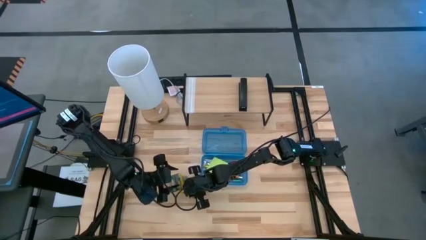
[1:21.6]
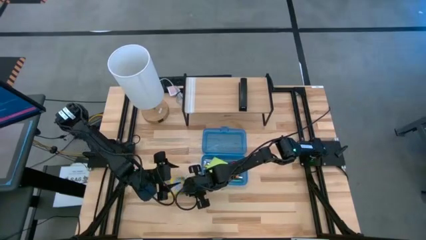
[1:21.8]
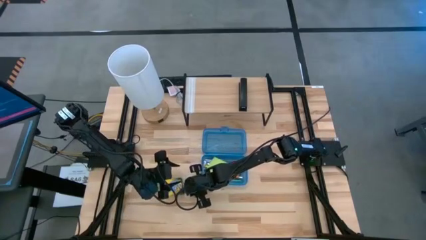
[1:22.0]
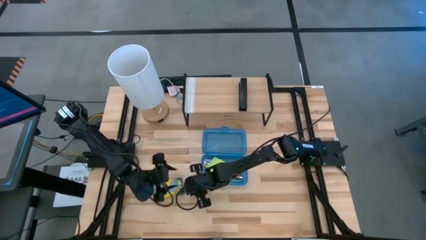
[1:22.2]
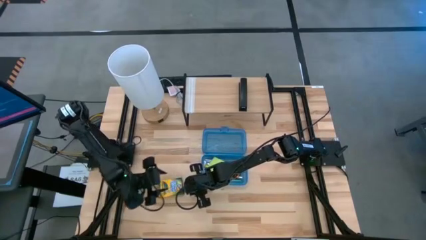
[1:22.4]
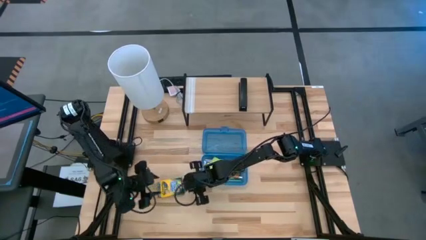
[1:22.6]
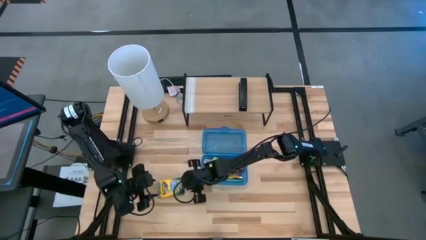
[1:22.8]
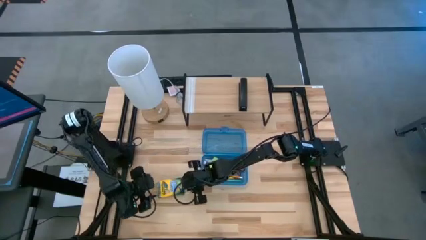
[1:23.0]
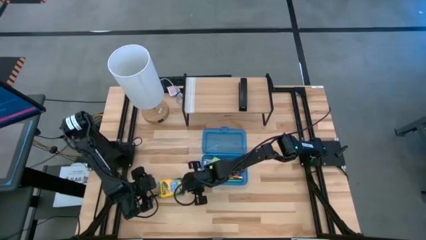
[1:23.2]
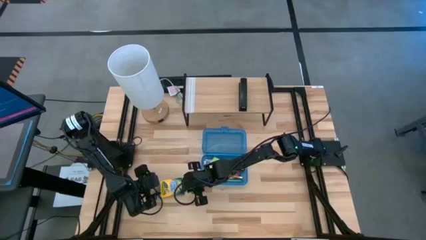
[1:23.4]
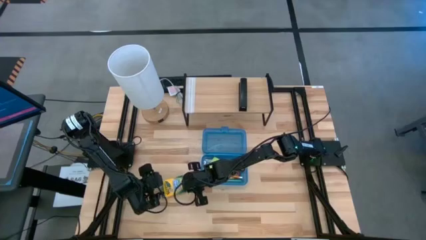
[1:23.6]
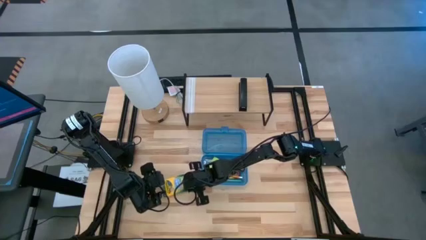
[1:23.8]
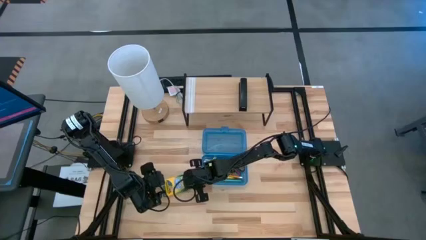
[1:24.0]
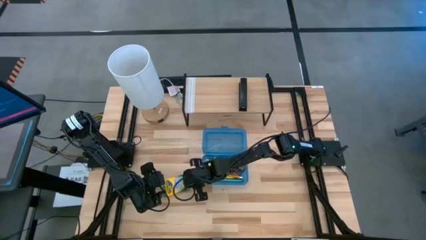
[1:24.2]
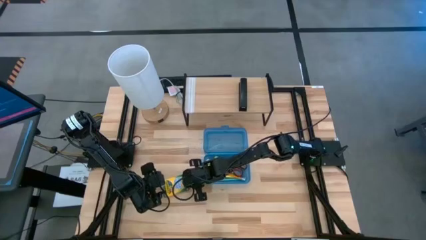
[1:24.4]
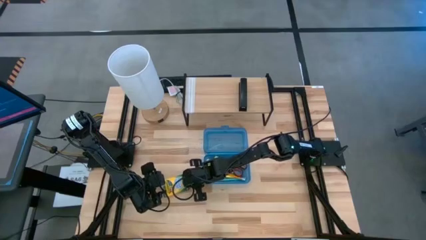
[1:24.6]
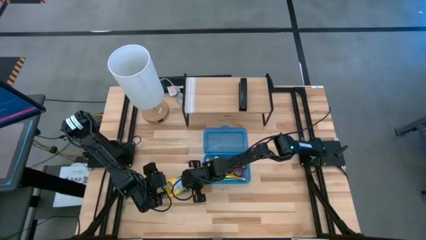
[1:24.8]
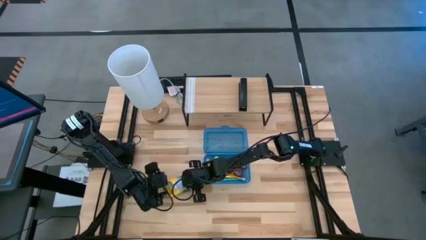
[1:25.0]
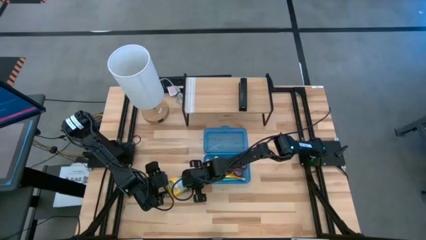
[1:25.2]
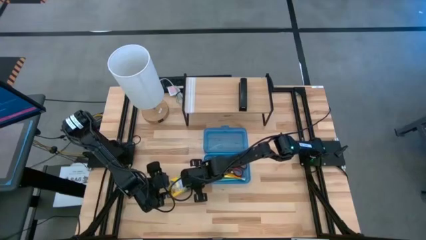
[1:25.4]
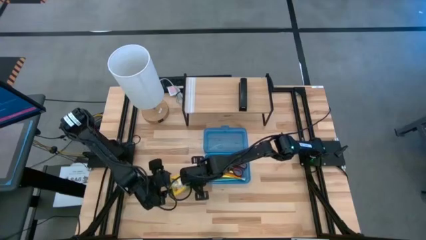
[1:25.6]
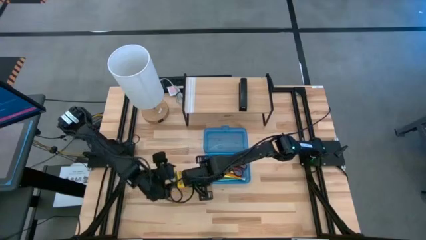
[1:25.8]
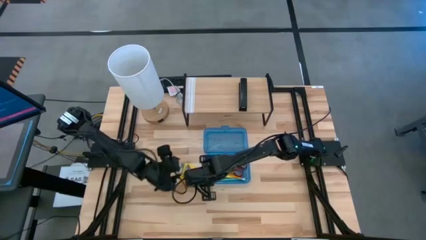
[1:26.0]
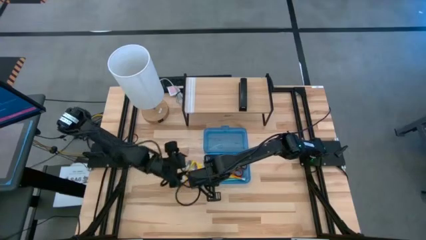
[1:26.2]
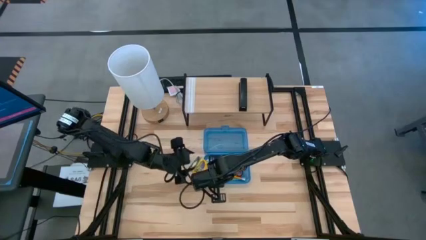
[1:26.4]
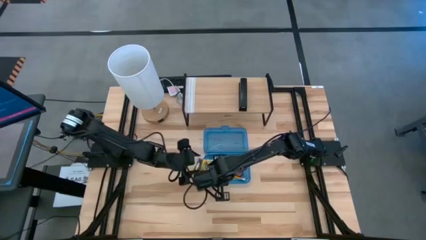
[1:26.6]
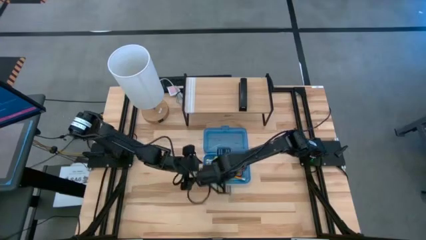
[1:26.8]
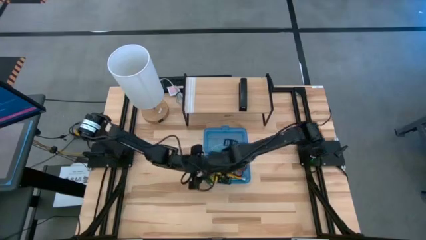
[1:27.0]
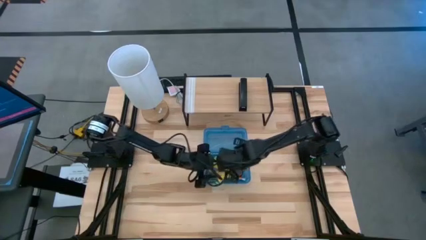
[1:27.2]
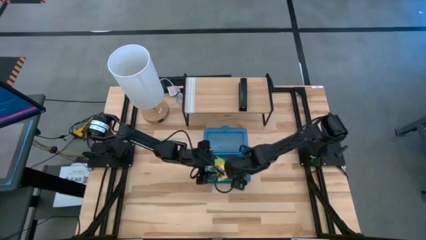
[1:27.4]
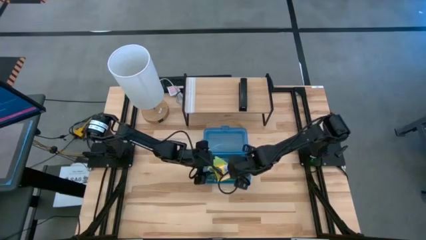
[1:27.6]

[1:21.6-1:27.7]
Task: Pack school essentials
Put the yellow crayon box into the blue supply box

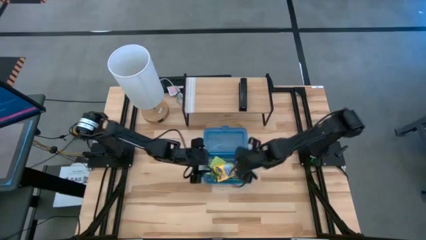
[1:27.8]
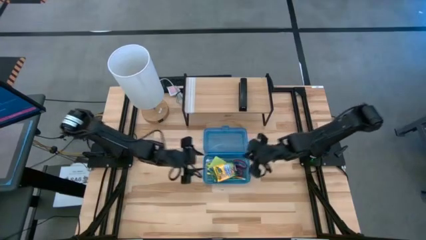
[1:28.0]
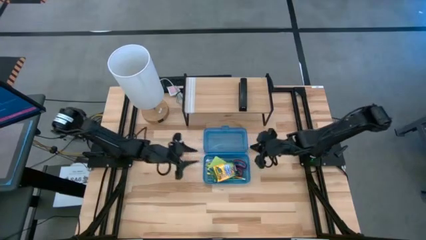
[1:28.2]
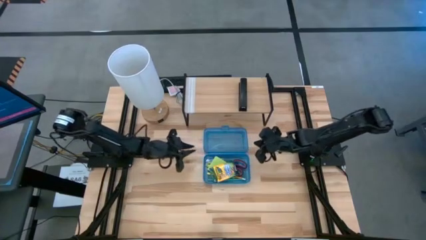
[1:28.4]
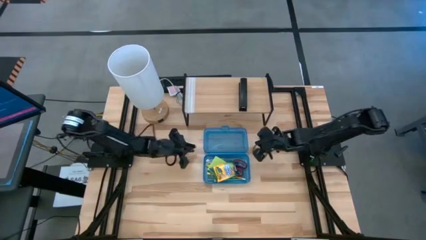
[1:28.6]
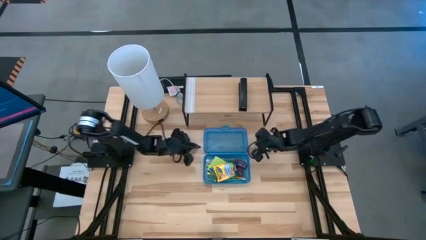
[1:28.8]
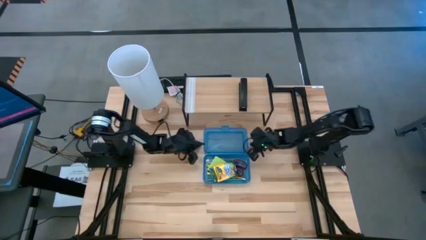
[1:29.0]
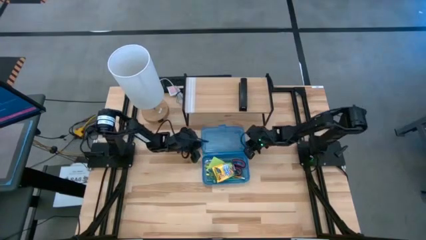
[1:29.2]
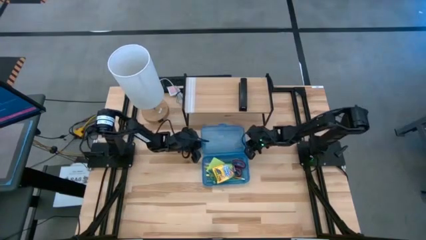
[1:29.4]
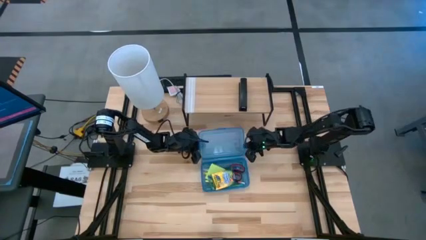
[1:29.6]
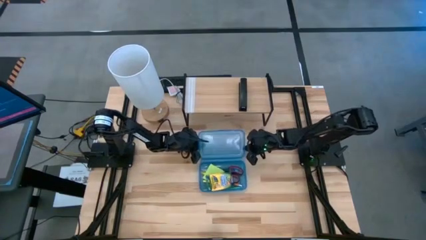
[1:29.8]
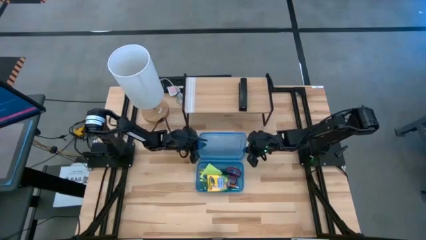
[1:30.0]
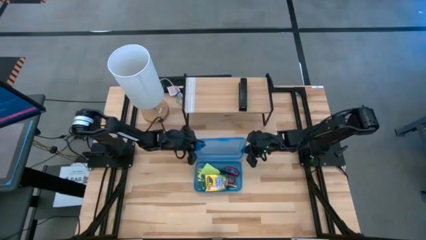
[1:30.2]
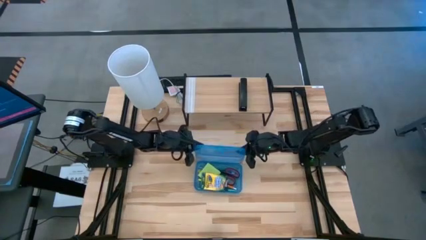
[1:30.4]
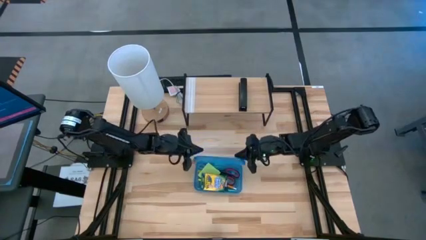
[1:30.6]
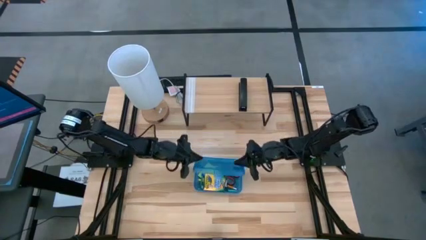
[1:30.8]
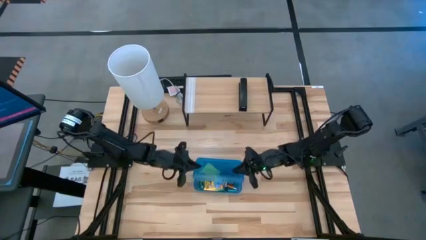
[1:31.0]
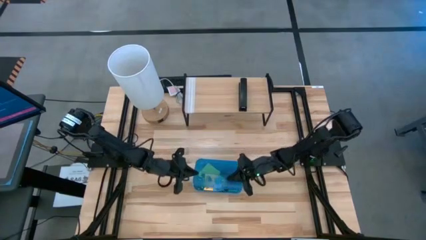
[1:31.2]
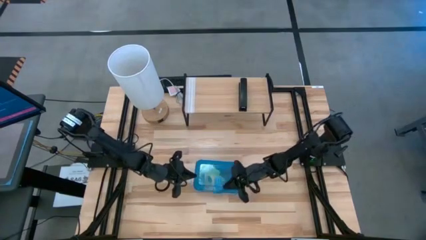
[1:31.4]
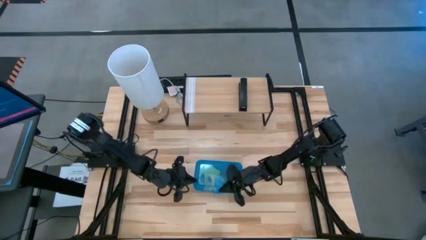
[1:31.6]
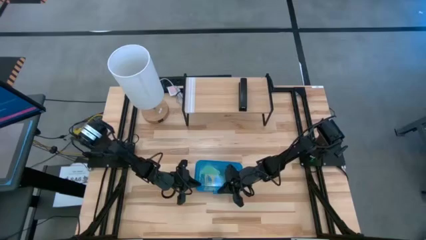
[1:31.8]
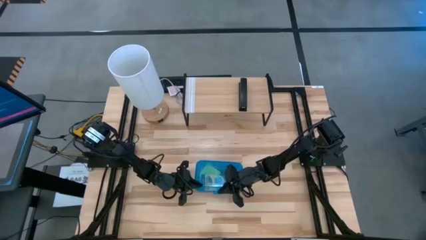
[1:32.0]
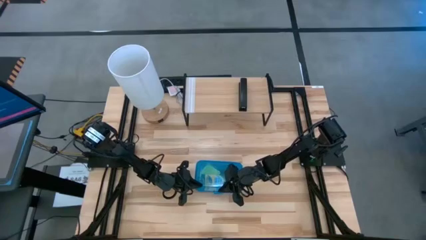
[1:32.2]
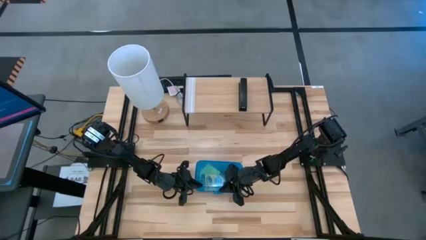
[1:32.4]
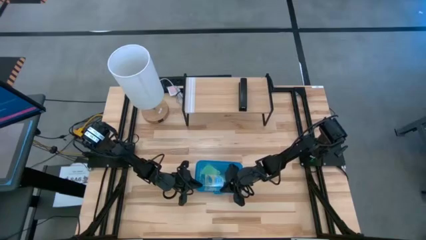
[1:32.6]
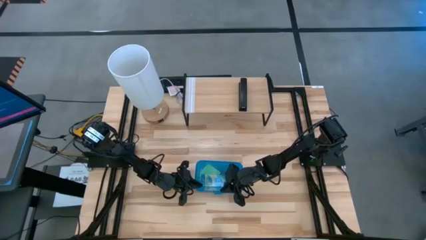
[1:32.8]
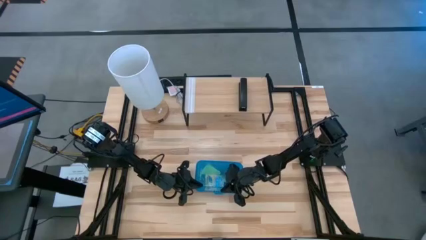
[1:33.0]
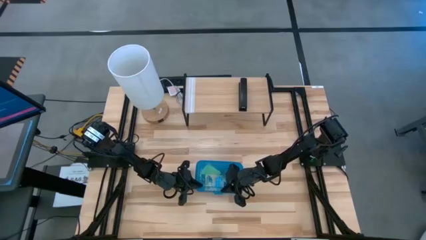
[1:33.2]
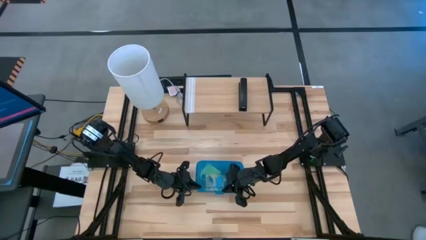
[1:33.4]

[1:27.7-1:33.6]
Close the blue supply box

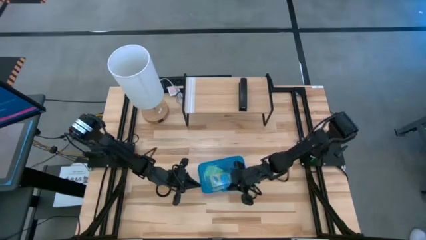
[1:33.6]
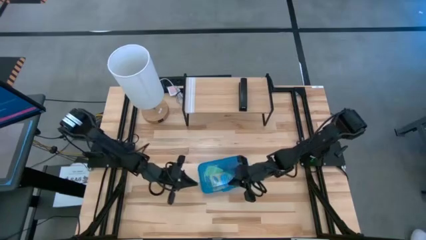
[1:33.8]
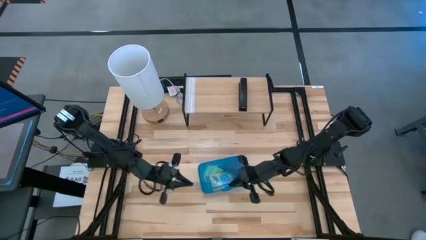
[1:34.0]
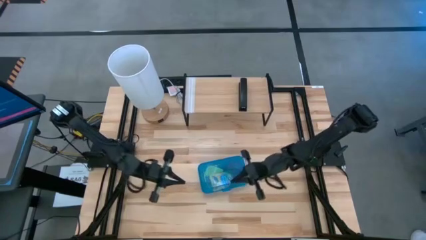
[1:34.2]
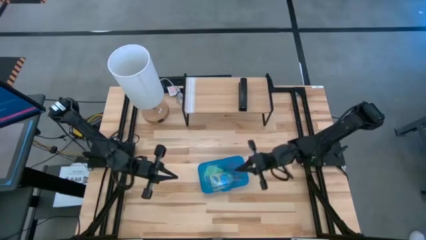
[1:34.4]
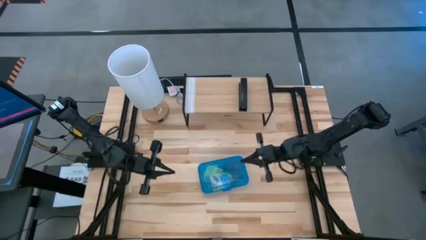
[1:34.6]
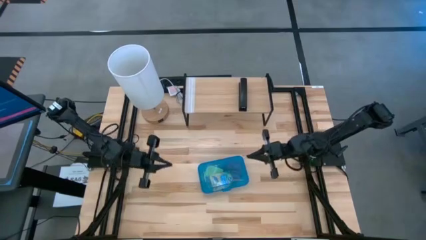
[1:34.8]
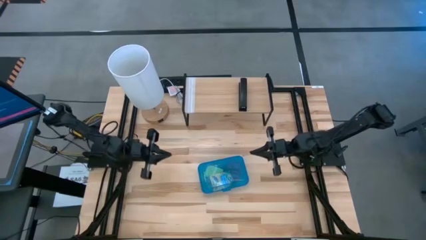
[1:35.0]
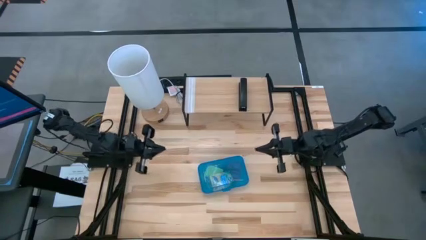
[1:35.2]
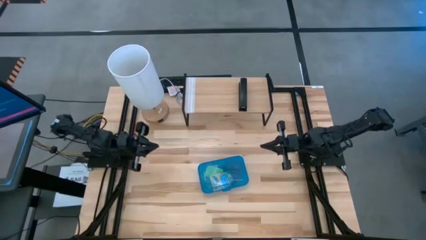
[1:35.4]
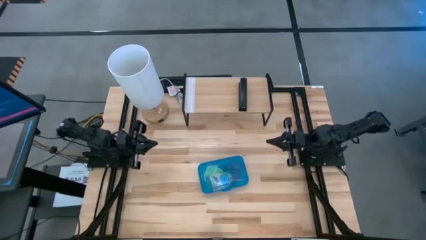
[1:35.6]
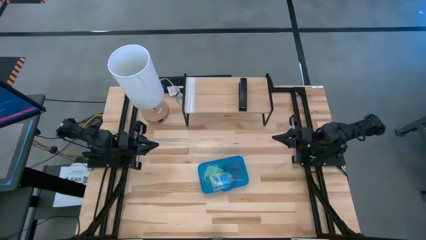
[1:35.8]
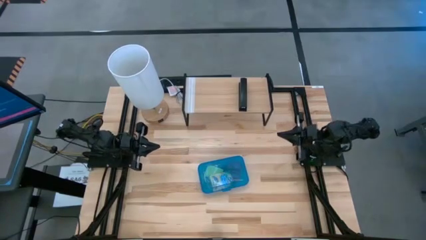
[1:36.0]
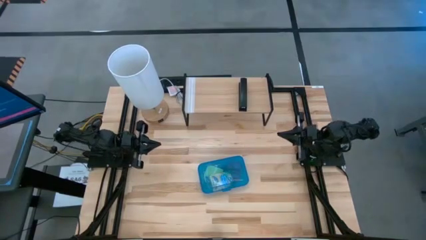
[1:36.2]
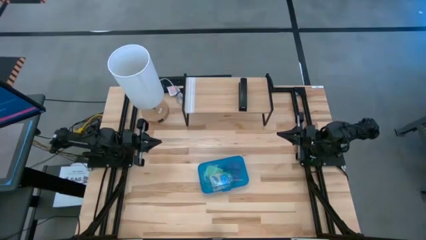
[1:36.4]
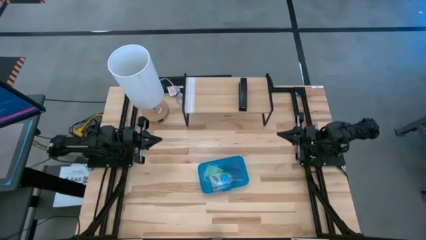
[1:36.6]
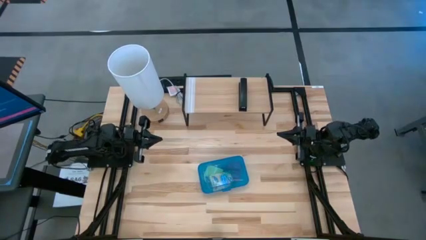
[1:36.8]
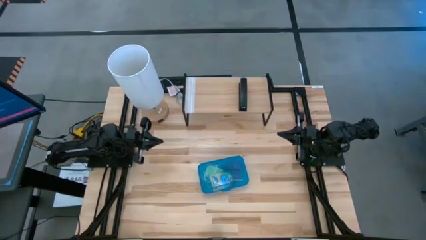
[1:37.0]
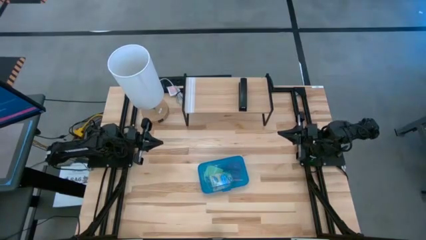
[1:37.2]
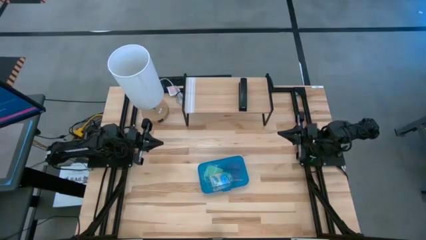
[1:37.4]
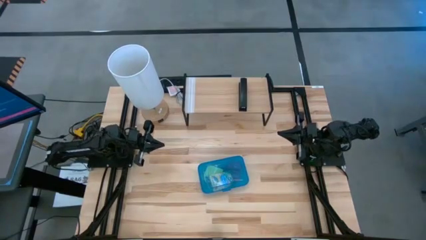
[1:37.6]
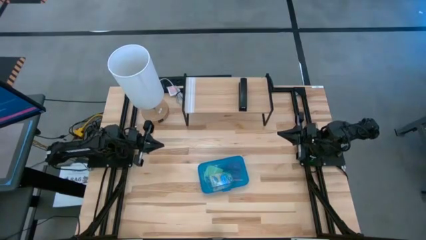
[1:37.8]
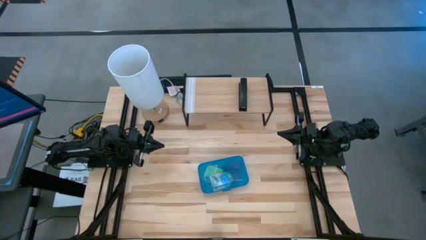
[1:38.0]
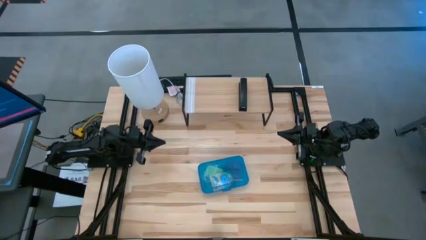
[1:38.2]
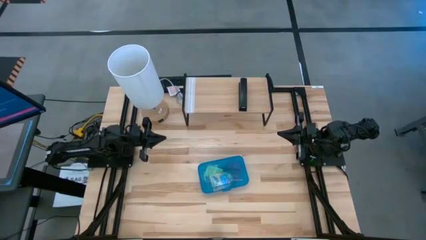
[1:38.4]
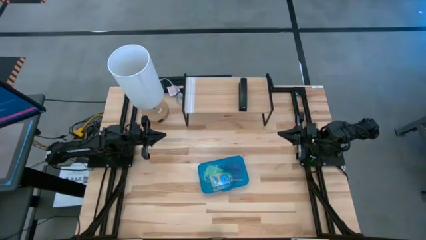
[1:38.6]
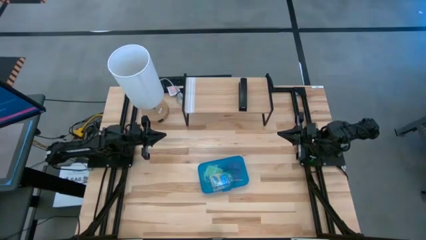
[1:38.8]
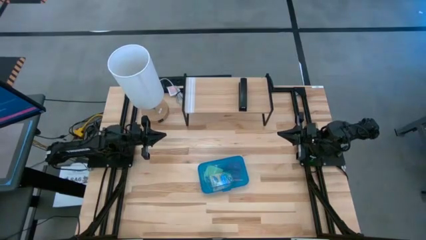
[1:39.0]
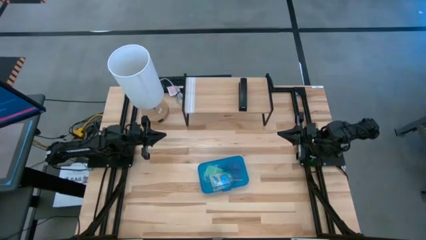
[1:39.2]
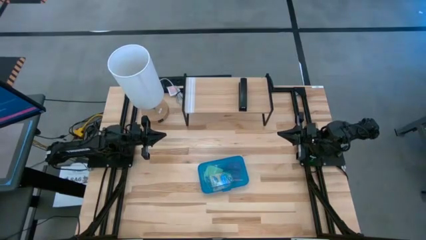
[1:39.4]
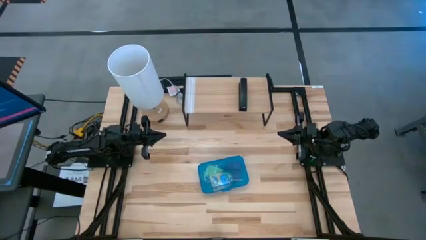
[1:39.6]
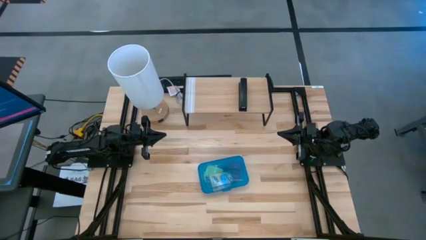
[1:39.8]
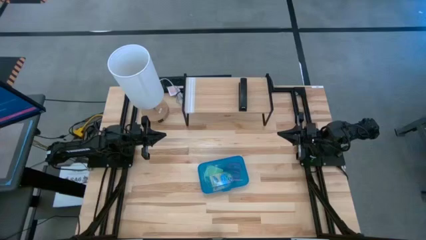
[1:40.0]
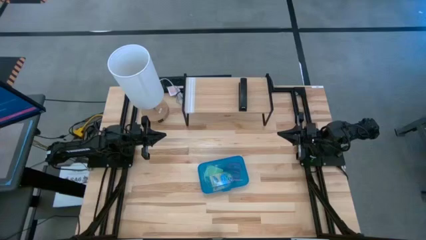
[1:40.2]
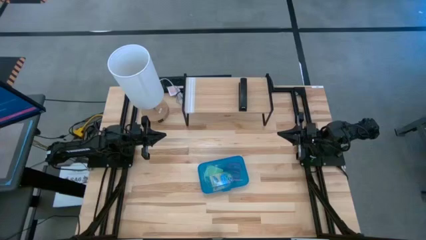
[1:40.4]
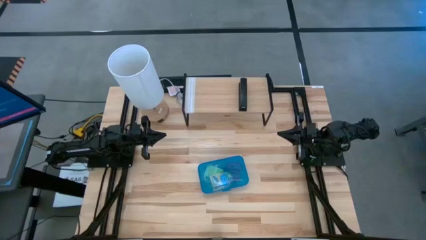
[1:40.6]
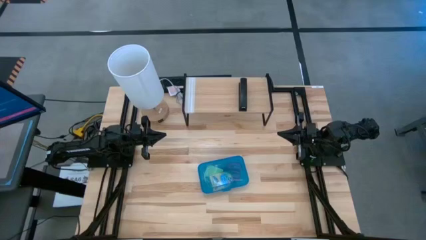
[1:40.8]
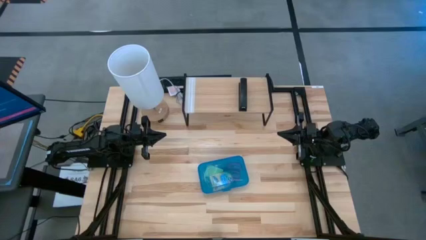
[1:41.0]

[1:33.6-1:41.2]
Return to Home Position
